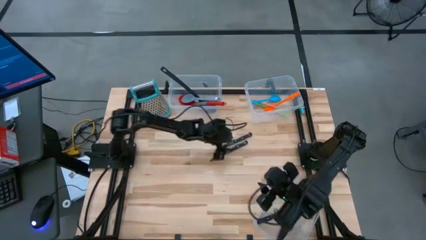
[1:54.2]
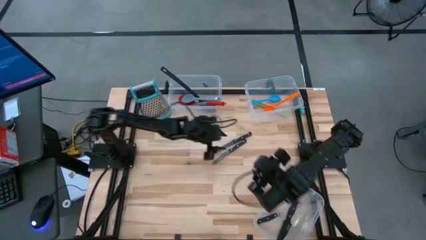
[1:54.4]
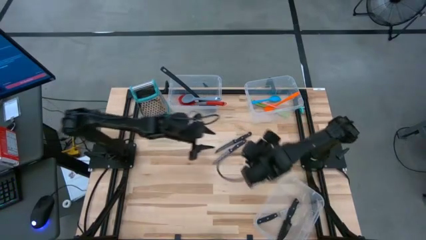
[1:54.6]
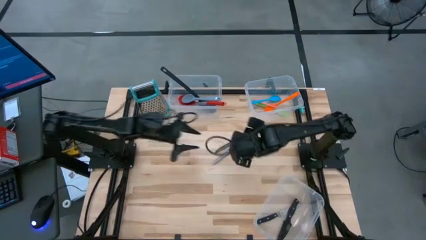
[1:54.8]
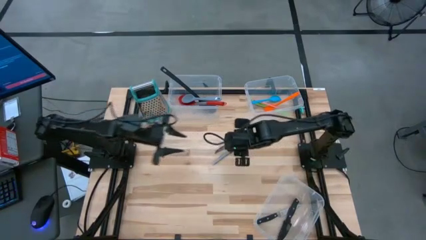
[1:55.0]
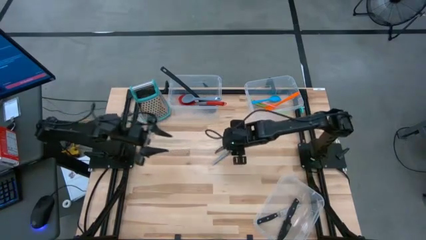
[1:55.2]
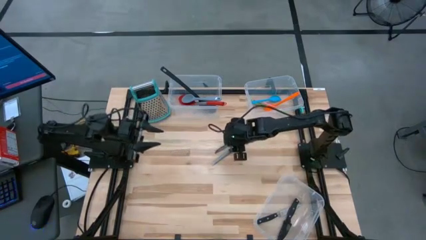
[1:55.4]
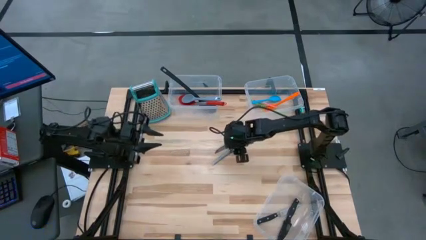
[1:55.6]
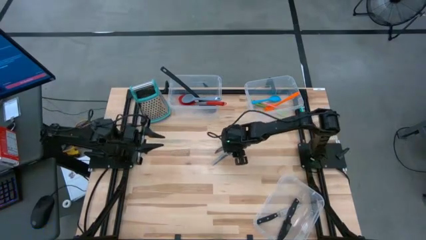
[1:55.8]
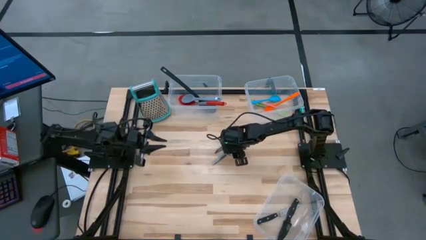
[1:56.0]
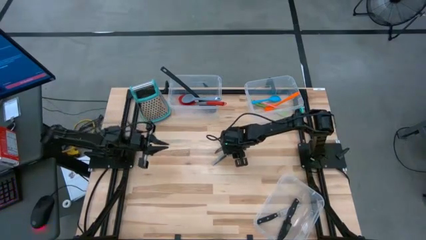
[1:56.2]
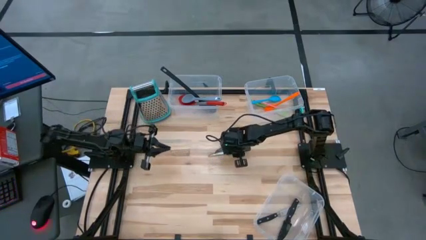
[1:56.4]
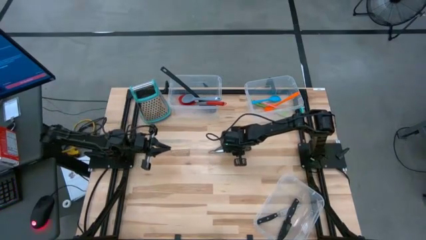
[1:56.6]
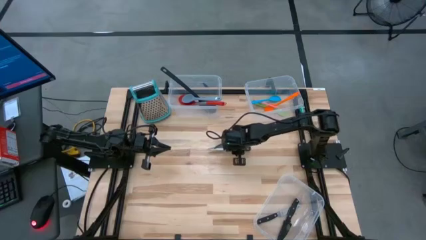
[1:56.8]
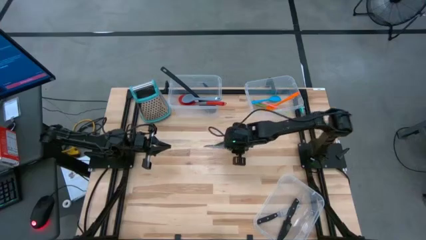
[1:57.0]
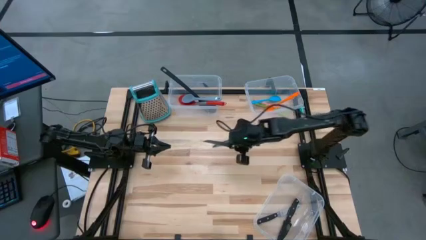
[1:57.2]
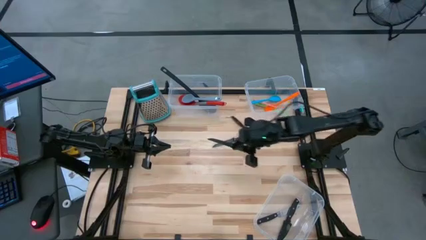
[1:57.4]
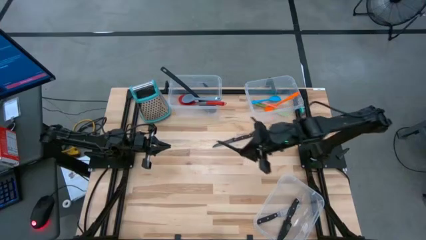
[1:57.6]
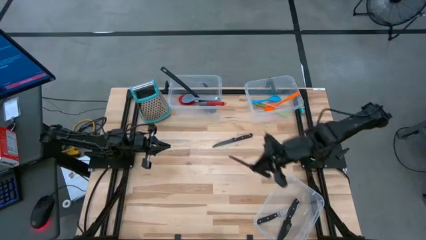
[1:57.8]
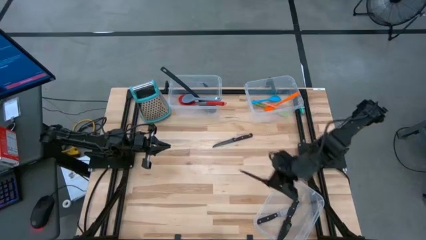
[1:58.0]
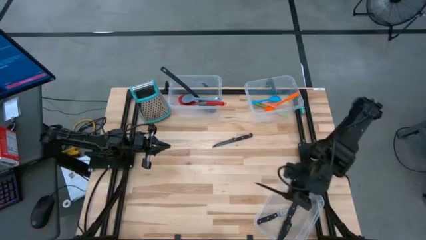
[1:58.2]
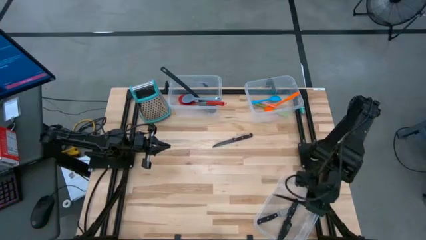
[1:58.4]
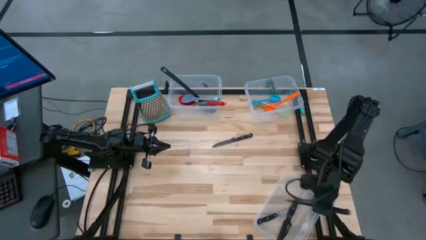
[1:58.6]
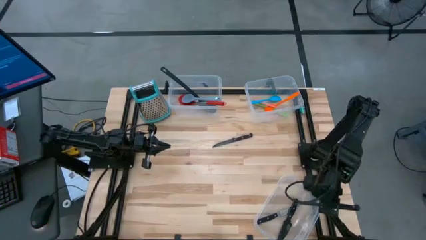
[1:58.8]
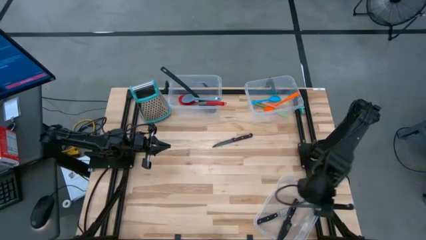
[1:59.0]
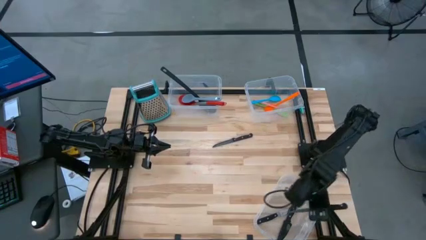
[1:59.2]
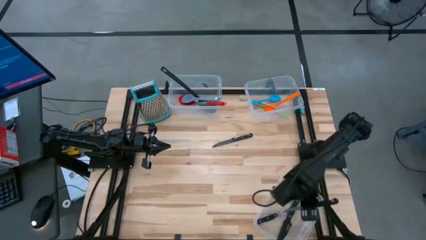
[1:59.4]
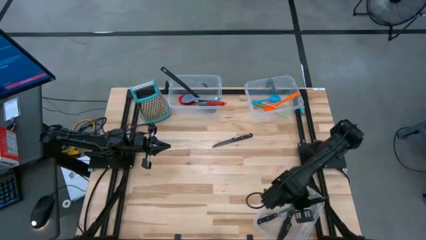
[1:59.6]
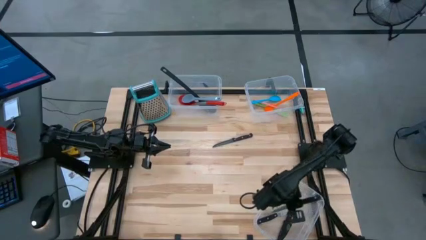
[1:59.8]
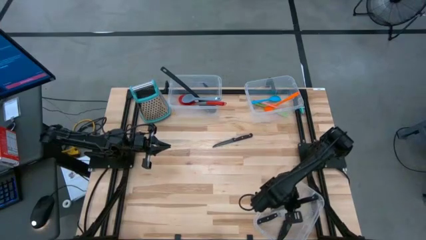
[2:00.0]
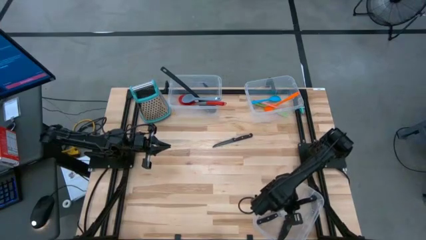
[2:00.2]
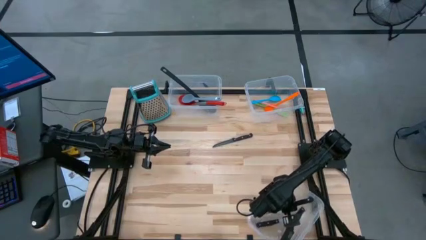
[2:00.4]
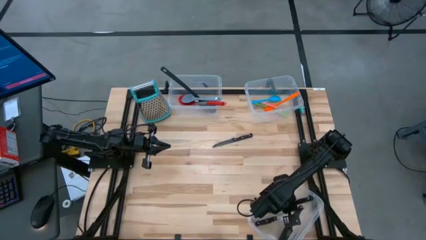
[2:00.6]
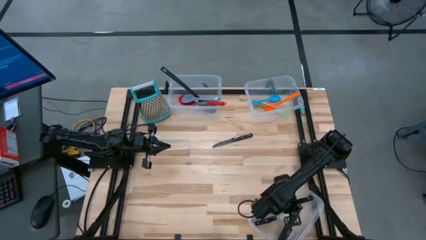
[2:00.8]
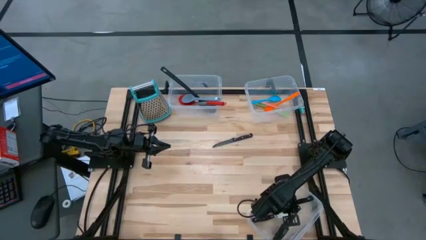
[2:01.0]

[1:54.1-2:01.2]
Task: Pick & Place Kitchen Items
Put the bottom silver knife into the bottom transparent bin

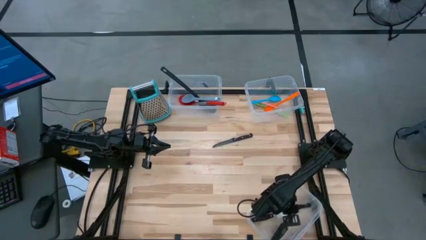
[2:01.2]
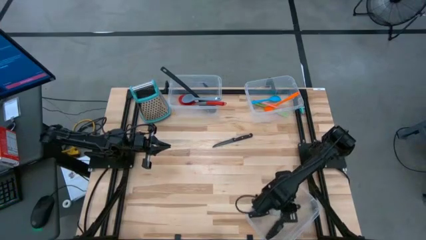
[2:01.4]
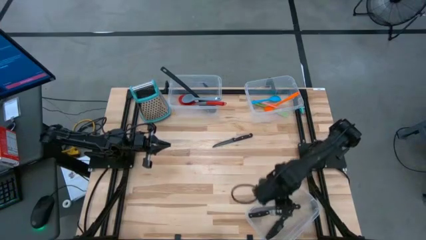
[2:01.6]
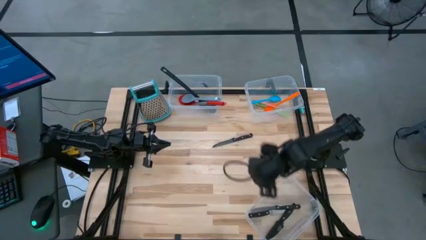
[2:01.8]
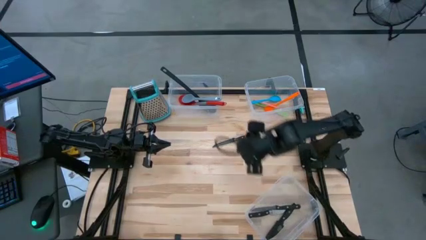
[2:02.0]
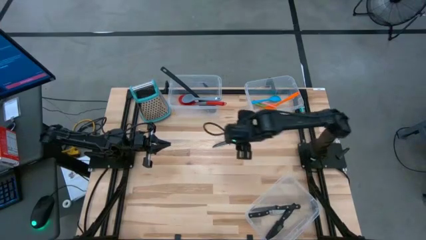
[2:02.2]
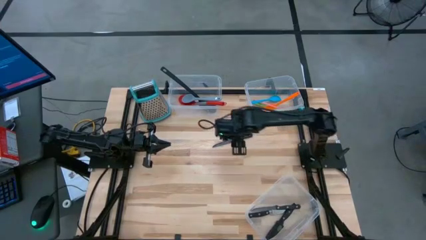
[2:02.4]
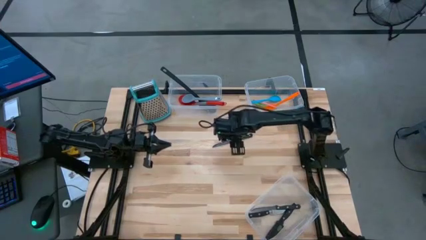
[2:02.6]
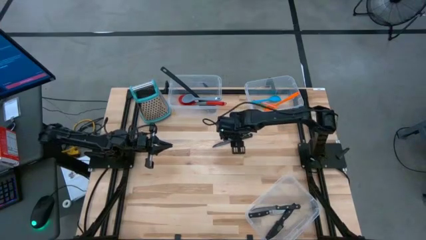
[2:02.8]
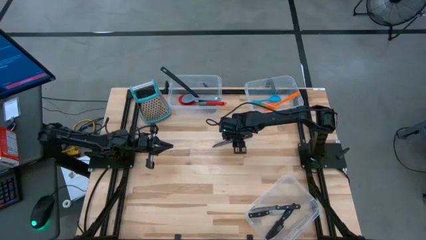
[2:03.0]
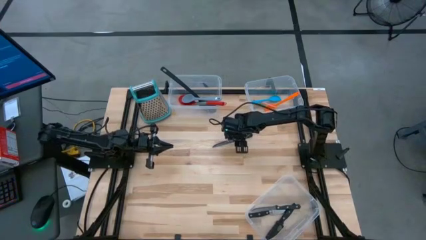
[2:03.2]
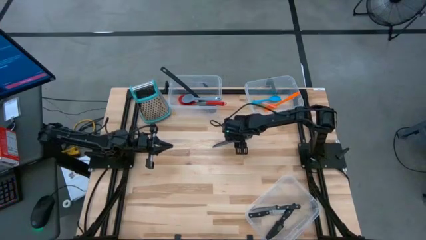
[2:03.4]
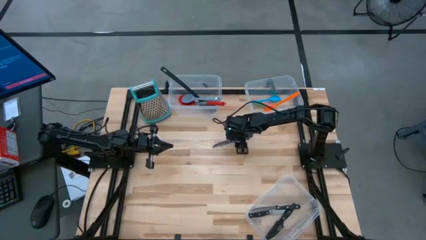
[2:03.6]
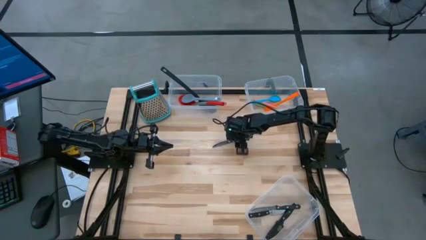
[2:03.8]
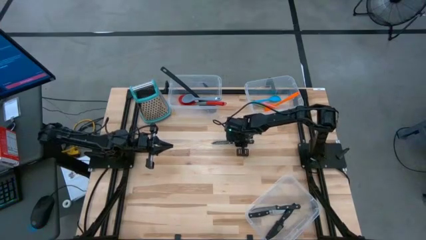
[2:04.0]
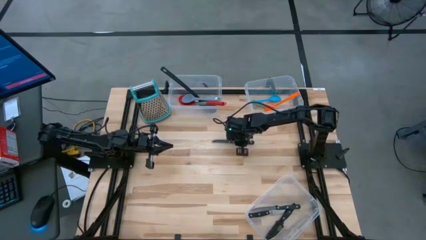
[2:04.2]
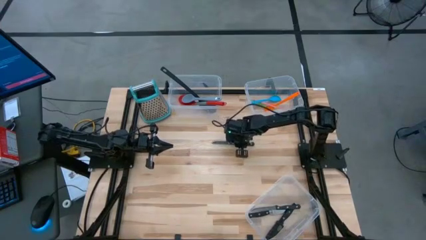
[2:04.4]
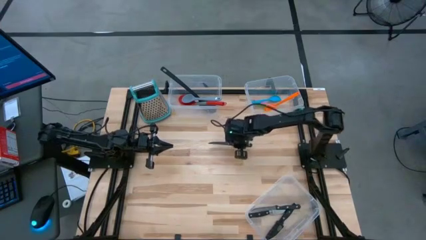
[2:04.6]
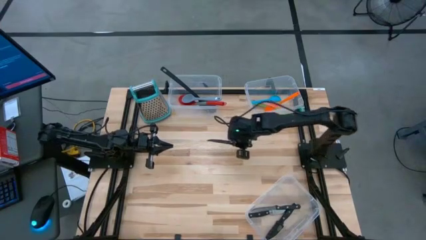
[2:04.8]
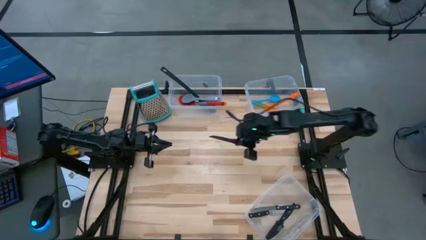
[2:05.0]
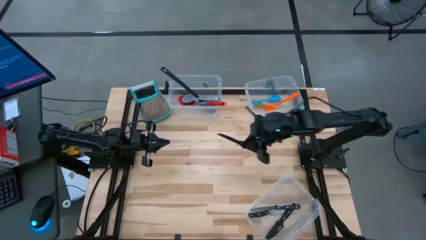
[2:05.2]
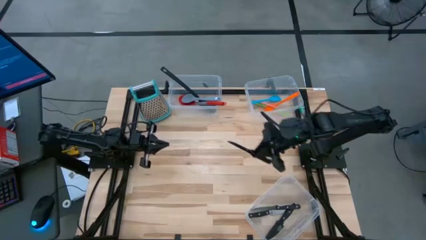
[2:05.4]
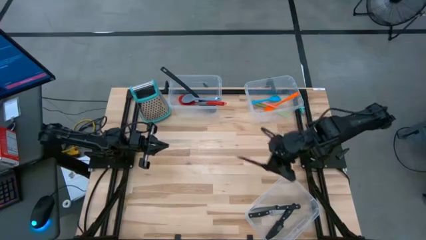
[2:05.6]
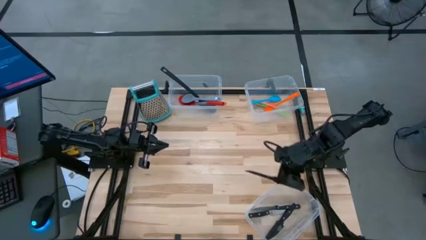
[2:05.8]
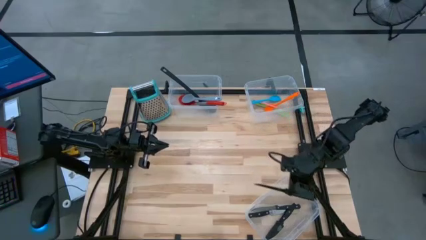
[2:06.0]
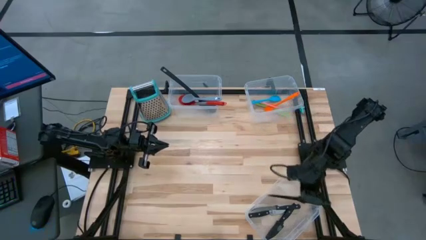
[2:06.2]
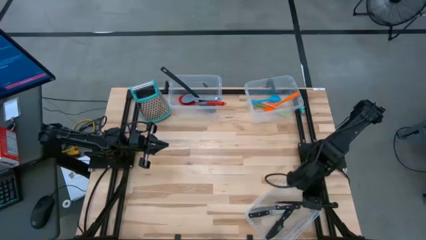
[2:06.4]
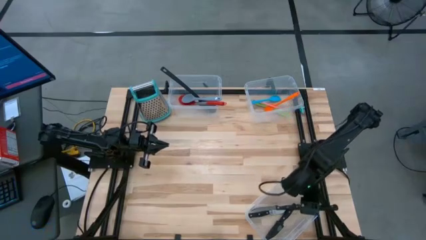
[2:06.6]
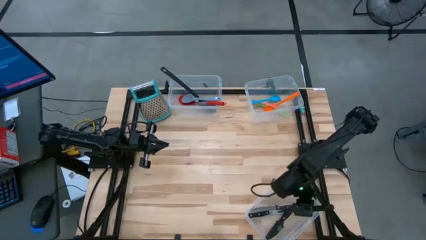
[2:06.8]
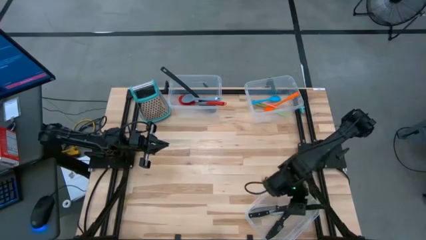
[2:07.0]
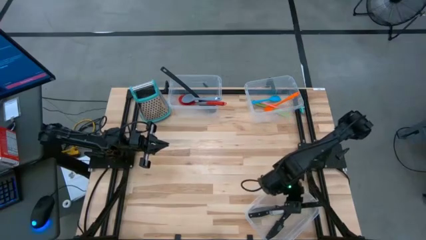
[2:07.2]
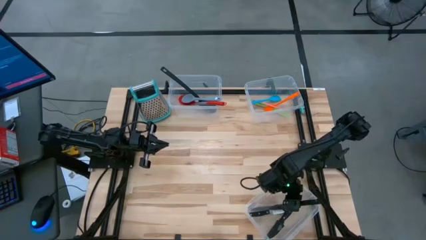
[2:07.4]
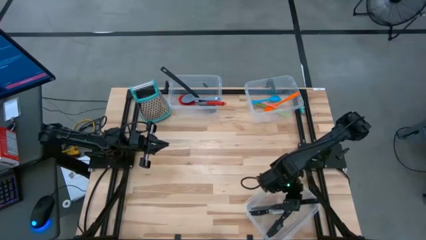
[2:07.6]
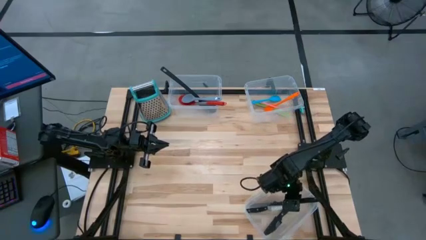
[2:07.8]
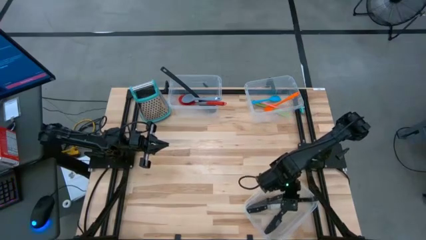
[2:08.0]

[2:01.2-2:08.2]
Put the silver knife into the bottom transparent bin
